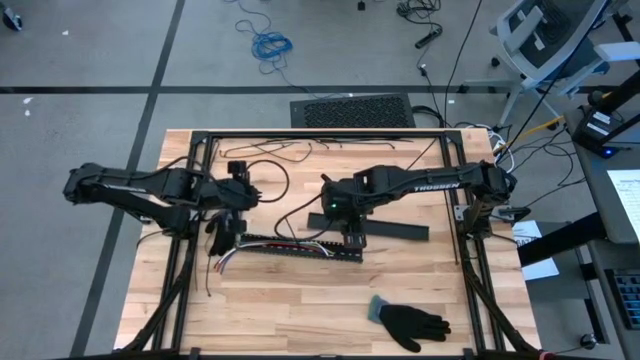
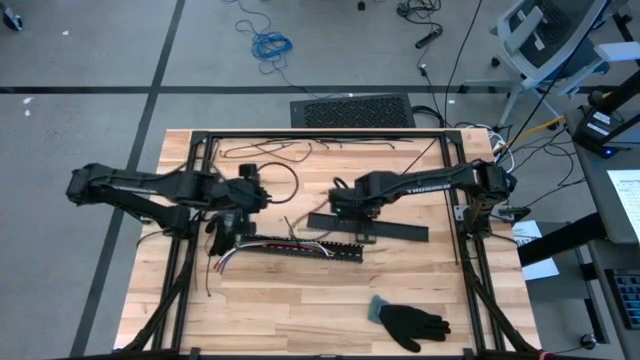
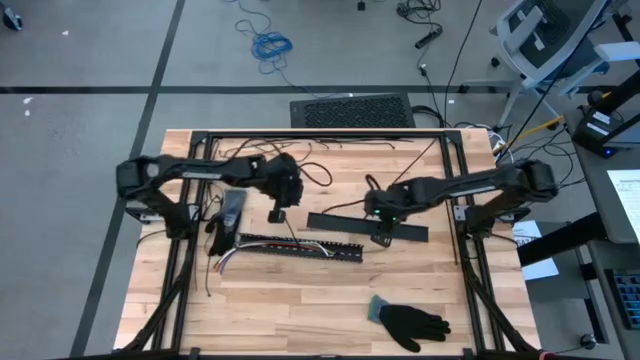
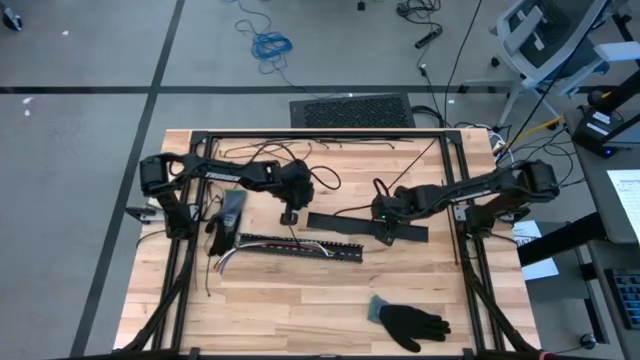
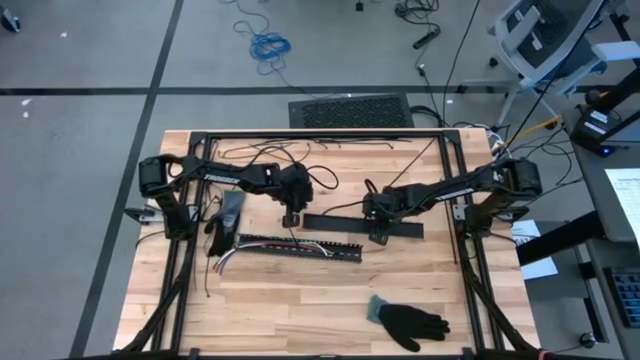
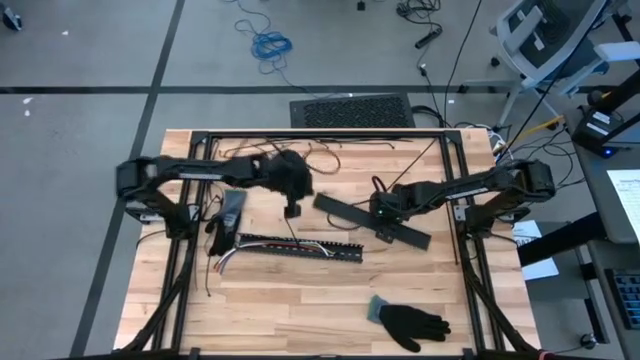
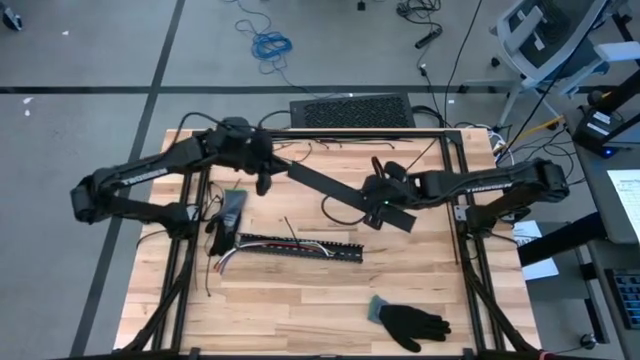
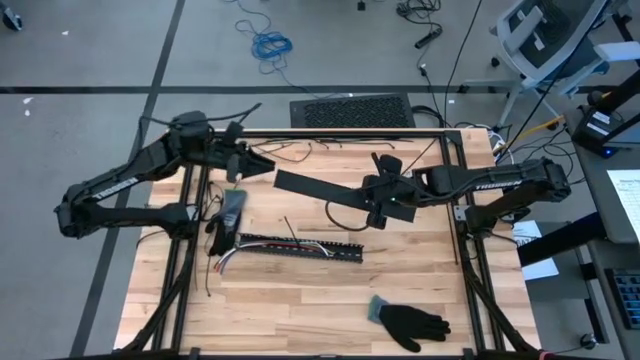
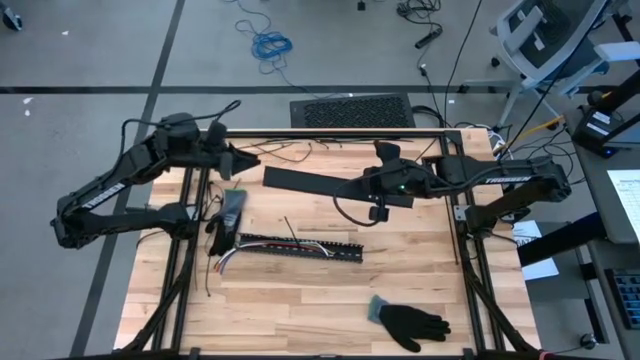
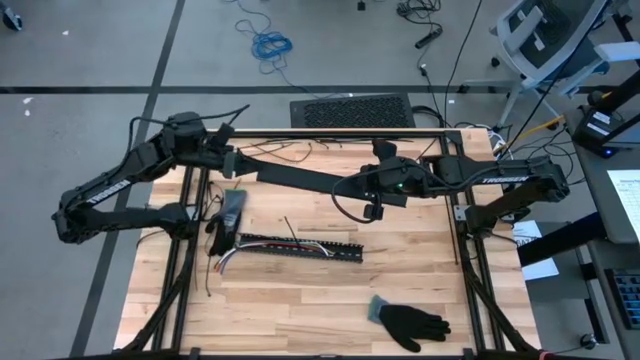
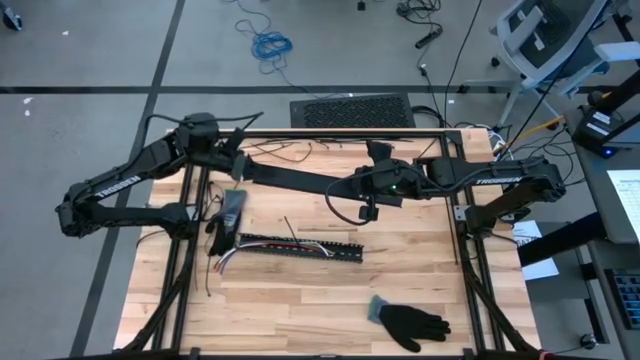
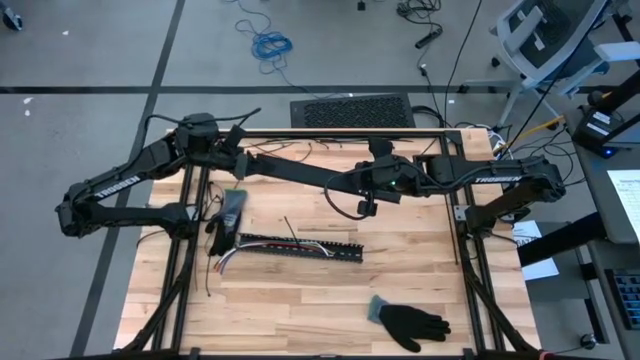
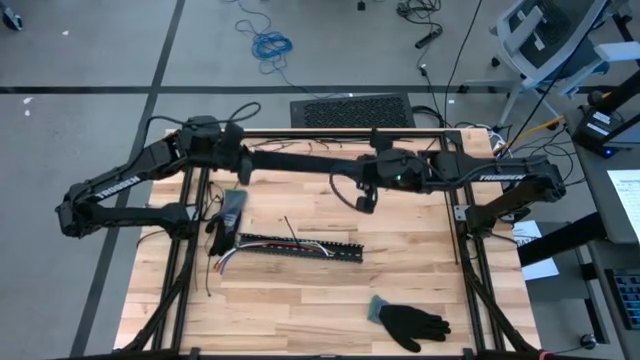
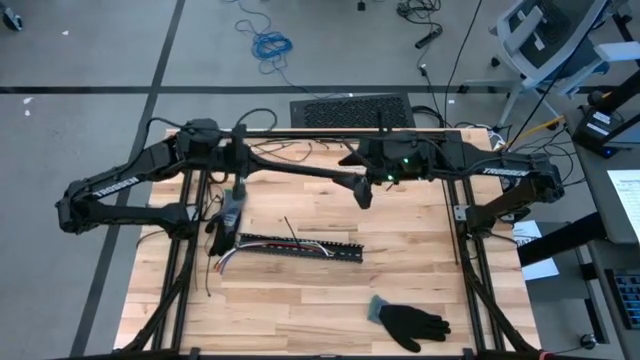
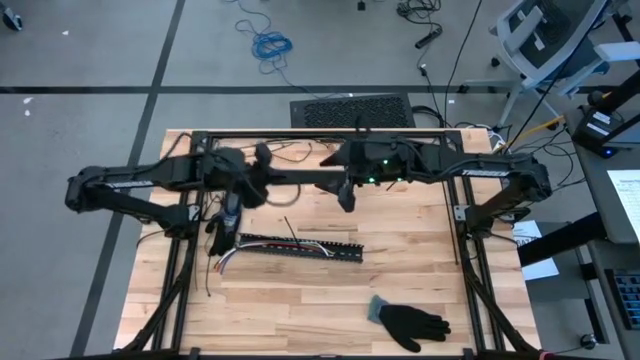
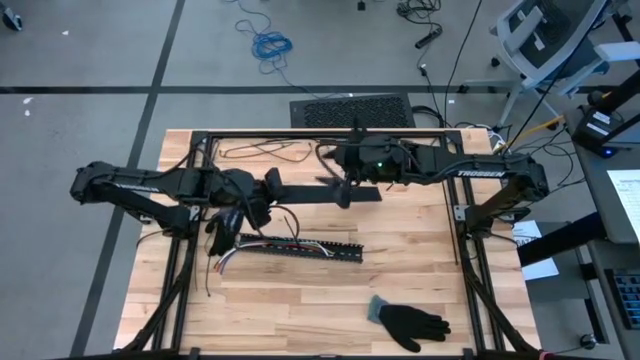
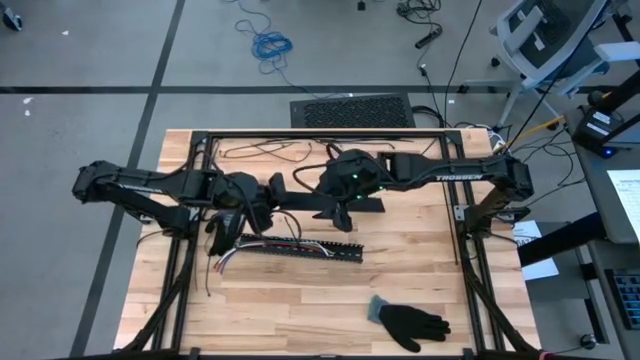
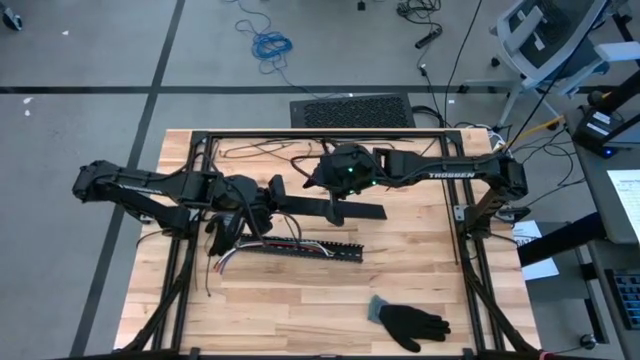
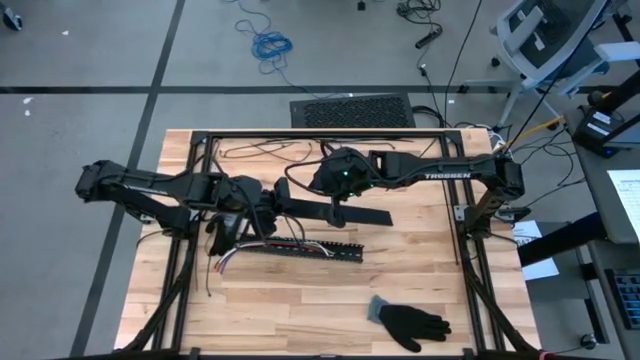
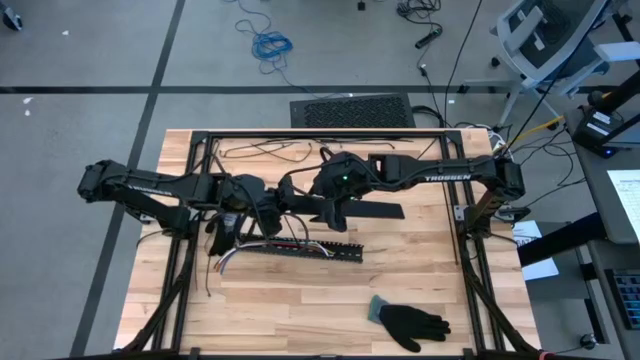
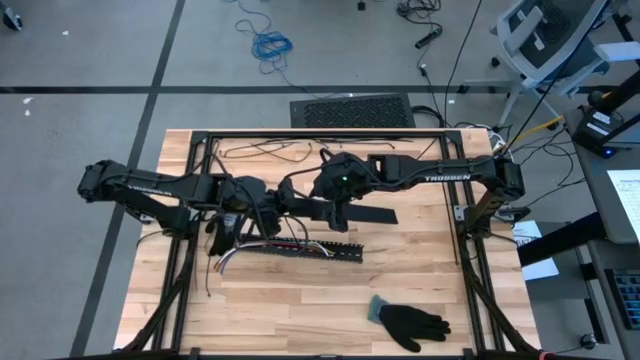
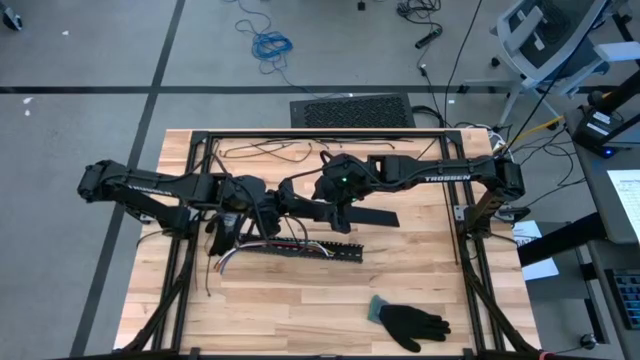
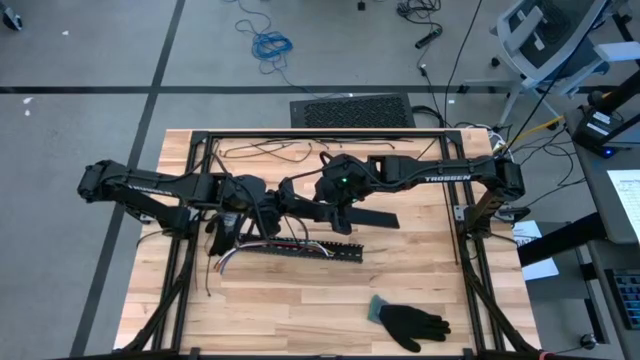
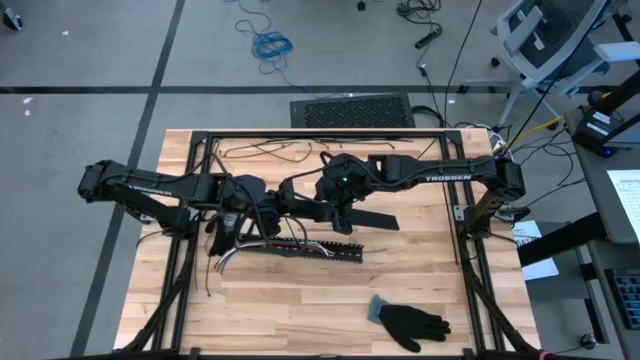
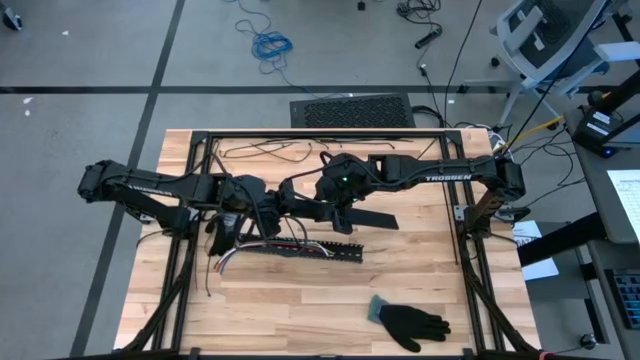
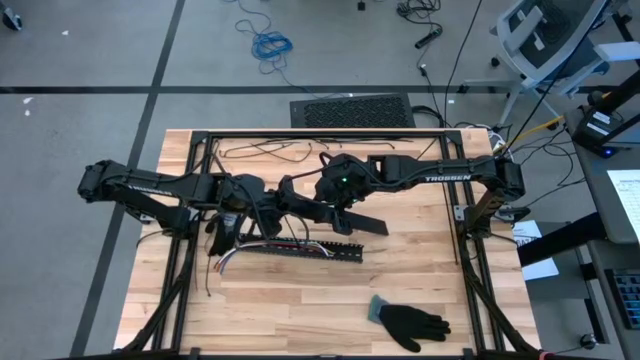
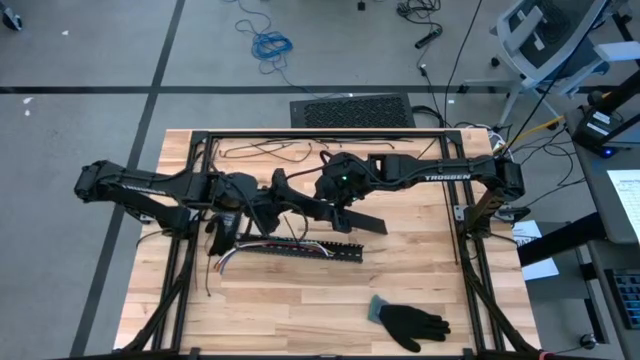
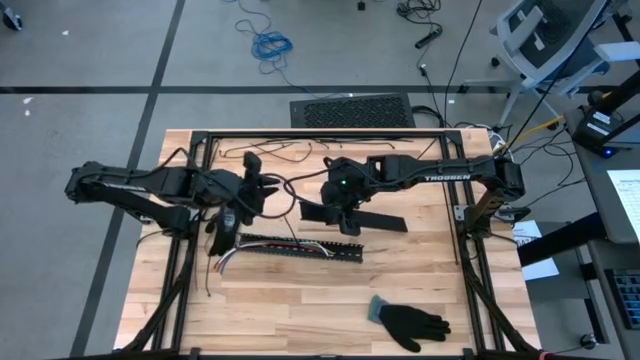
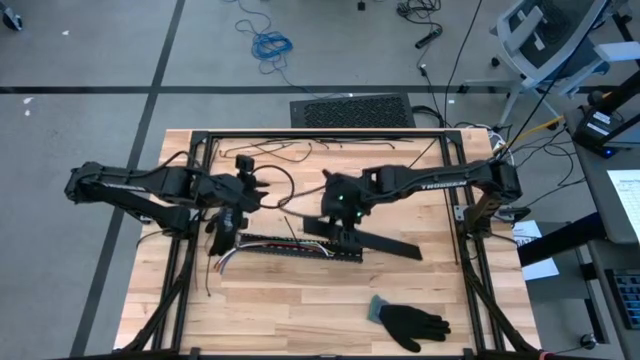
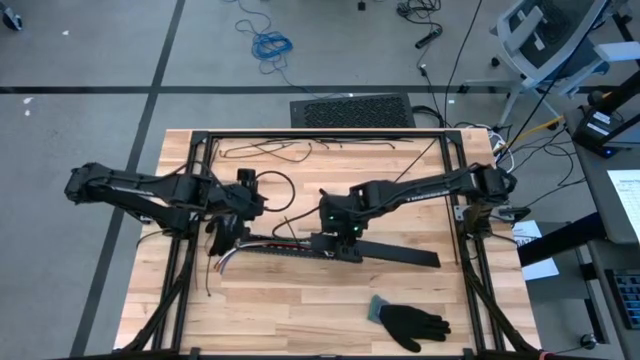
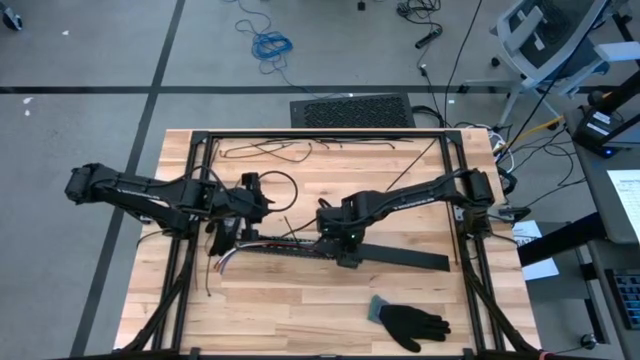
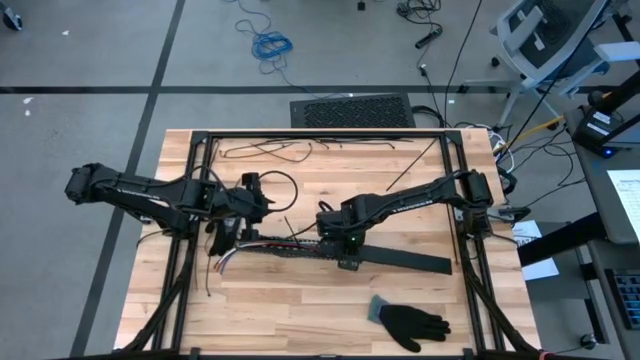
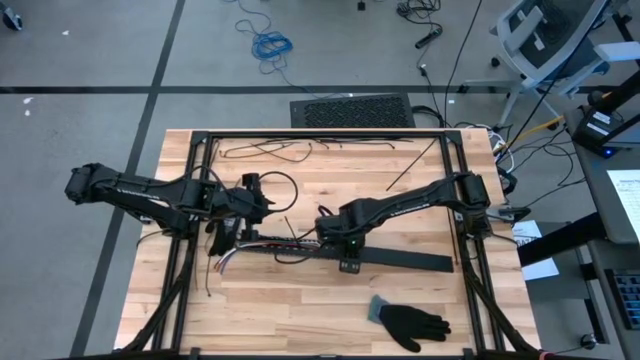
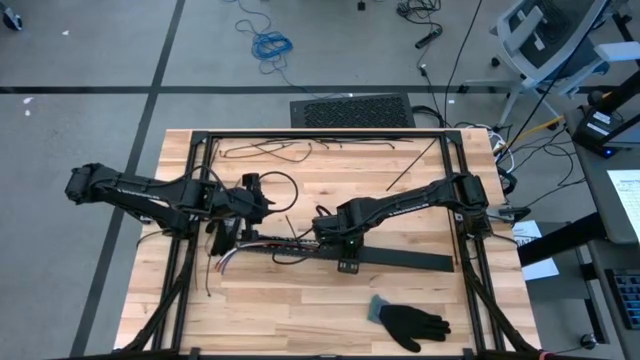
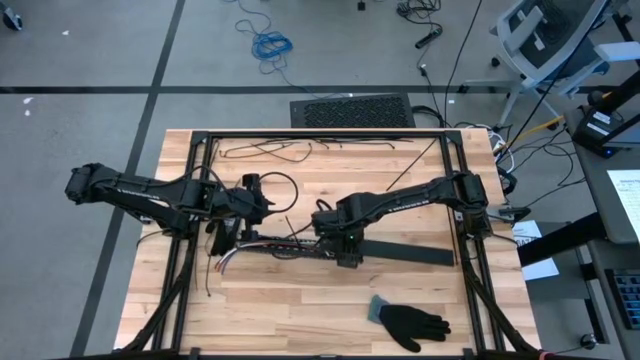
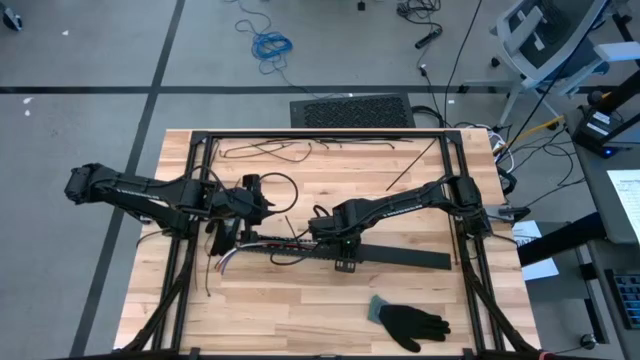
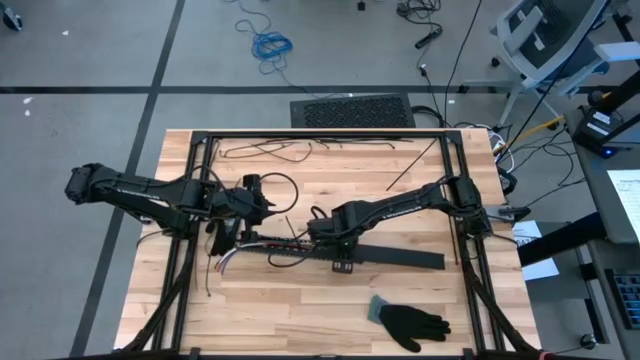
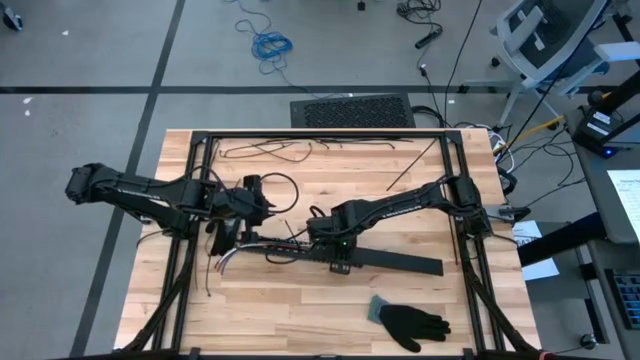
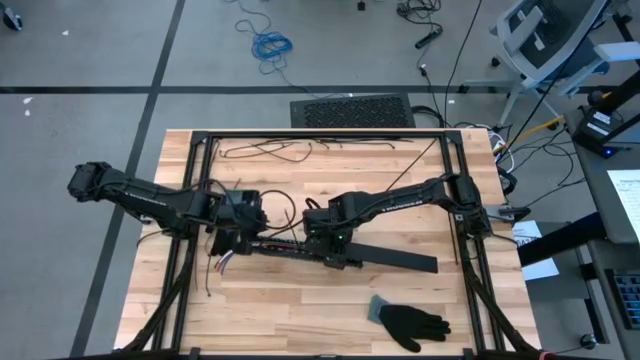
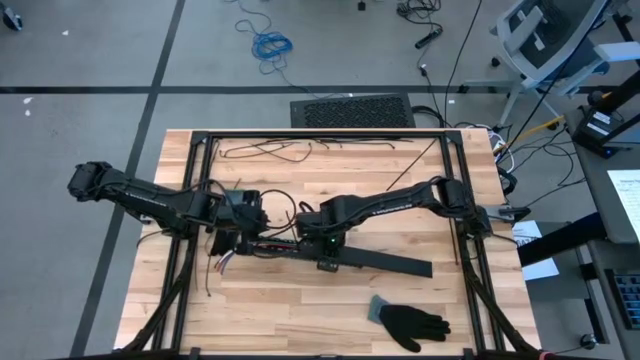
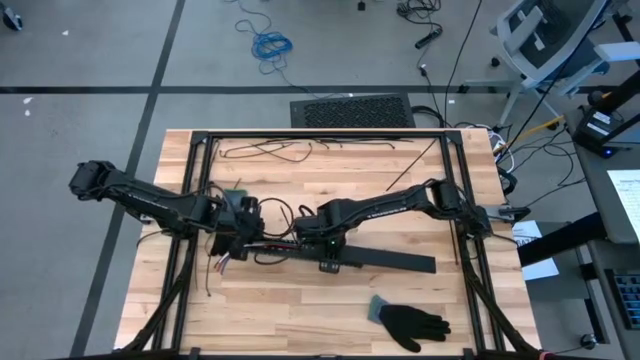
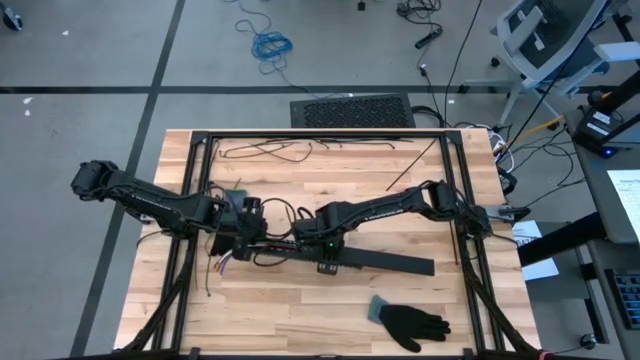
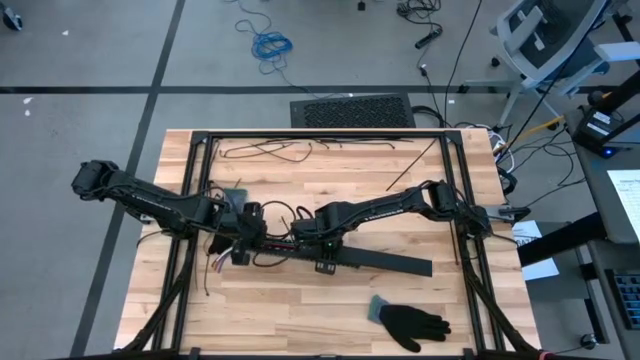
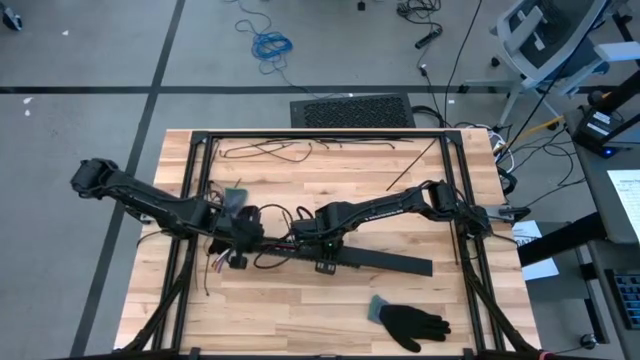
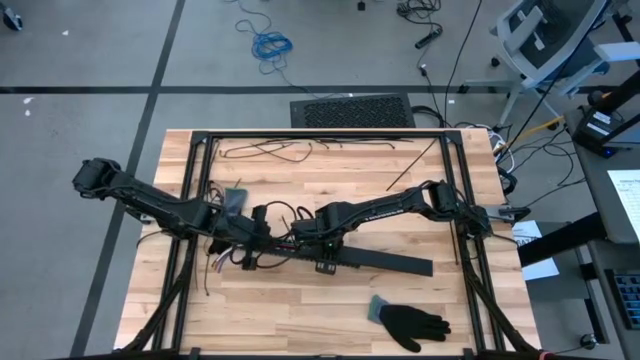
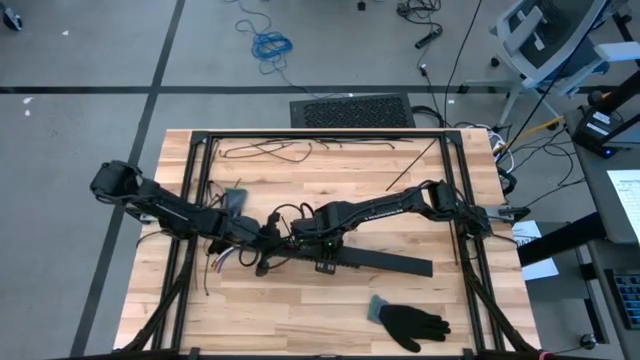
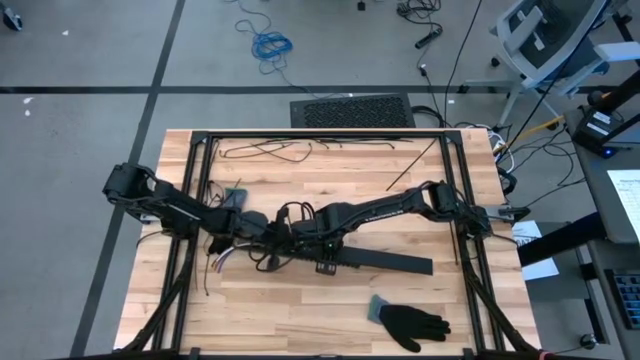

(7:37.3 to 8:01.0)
Task: Ziptie cables
Close the cable duct with the cable duct cover
